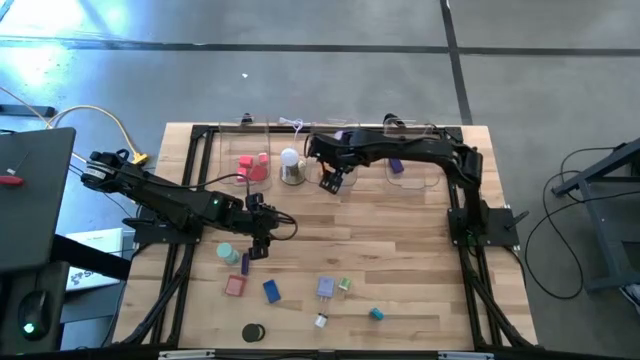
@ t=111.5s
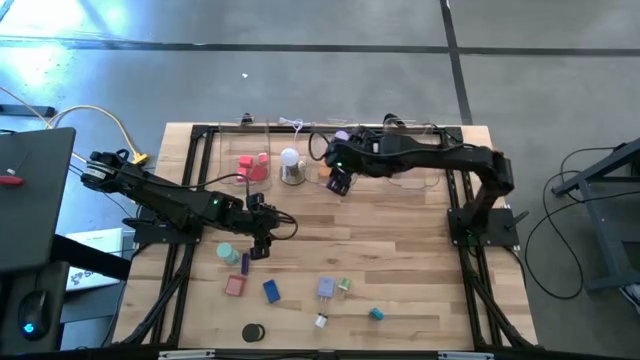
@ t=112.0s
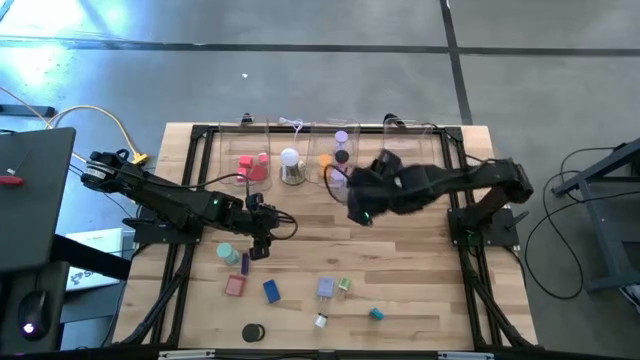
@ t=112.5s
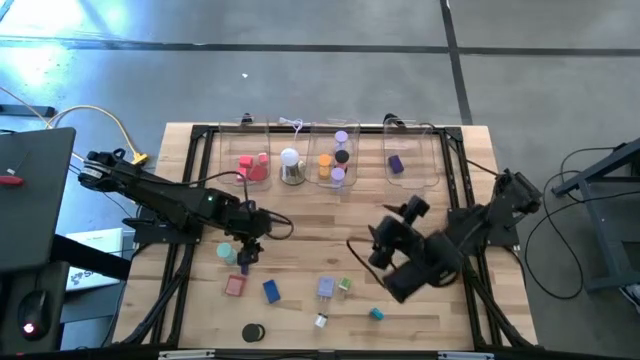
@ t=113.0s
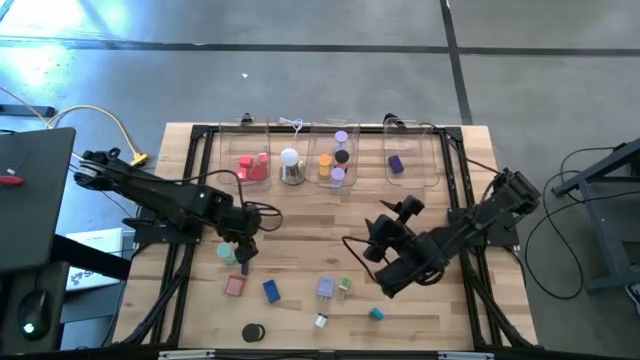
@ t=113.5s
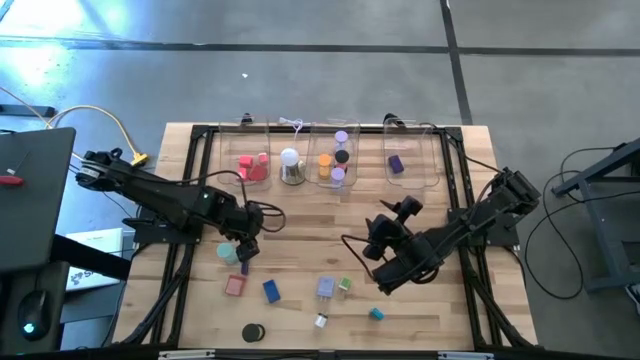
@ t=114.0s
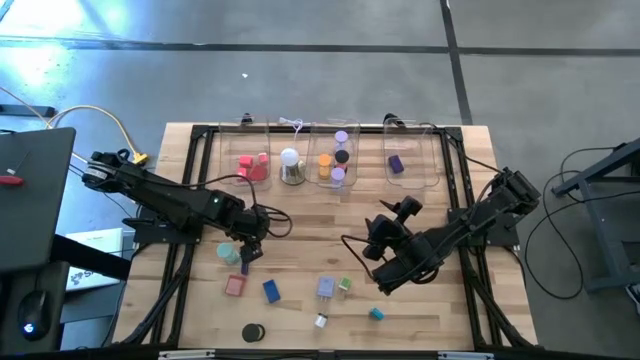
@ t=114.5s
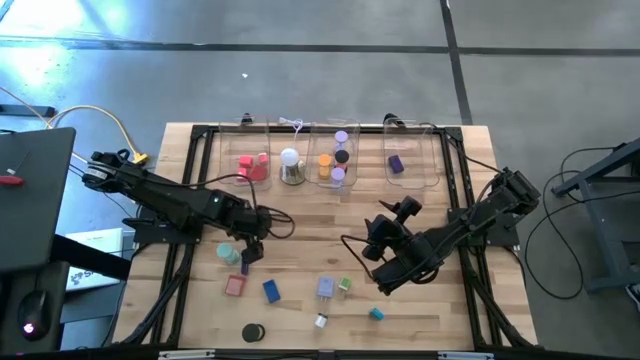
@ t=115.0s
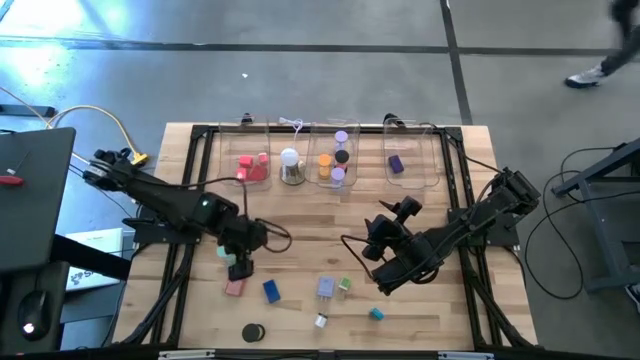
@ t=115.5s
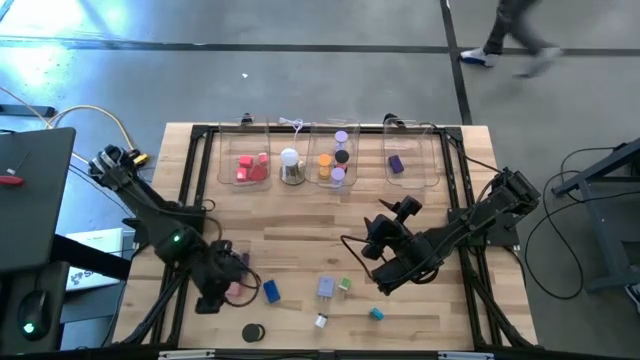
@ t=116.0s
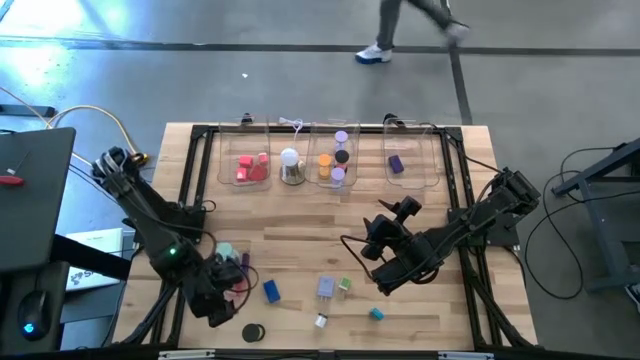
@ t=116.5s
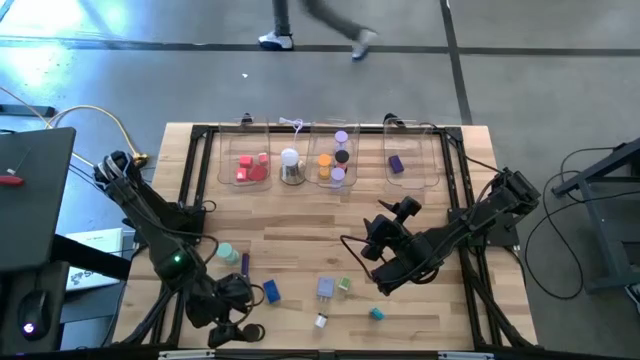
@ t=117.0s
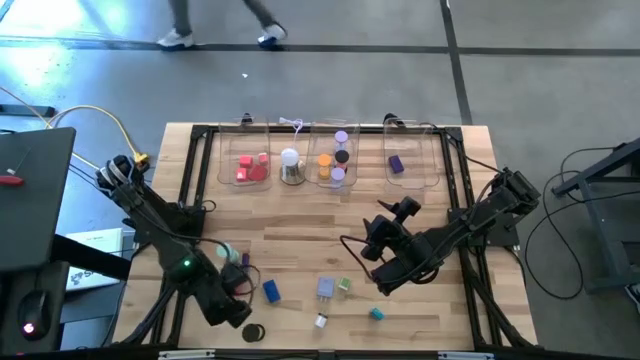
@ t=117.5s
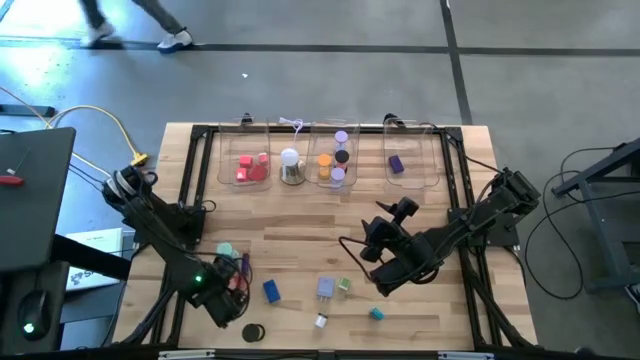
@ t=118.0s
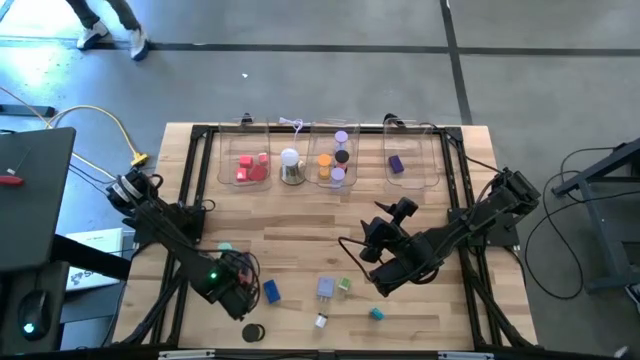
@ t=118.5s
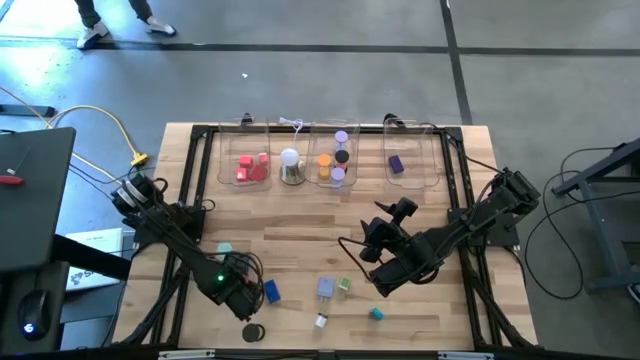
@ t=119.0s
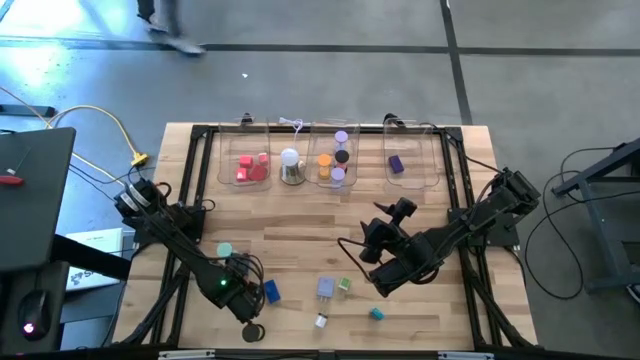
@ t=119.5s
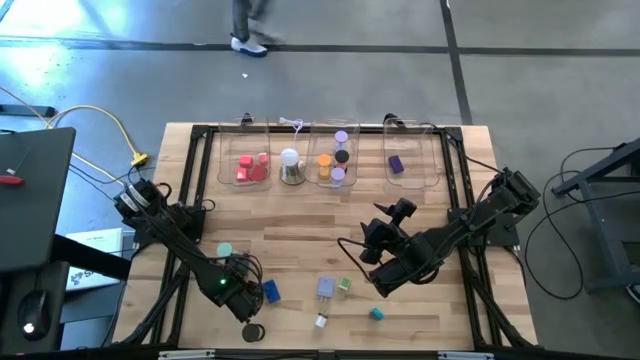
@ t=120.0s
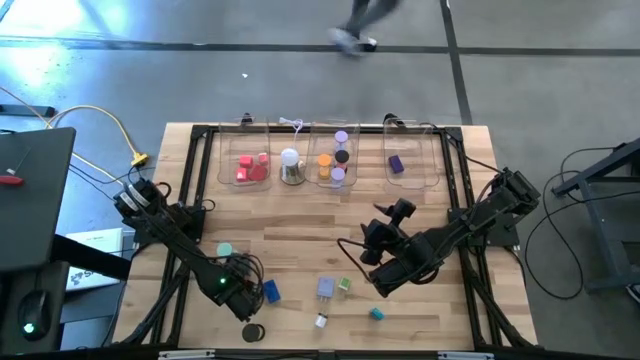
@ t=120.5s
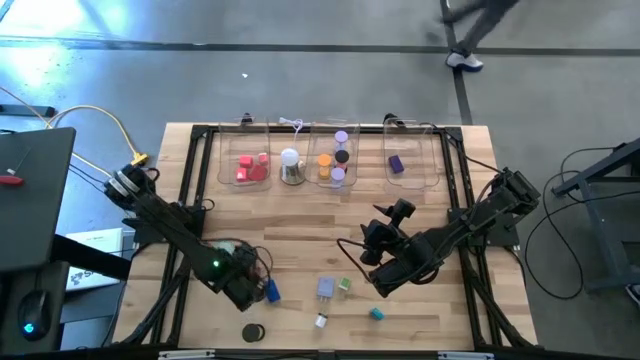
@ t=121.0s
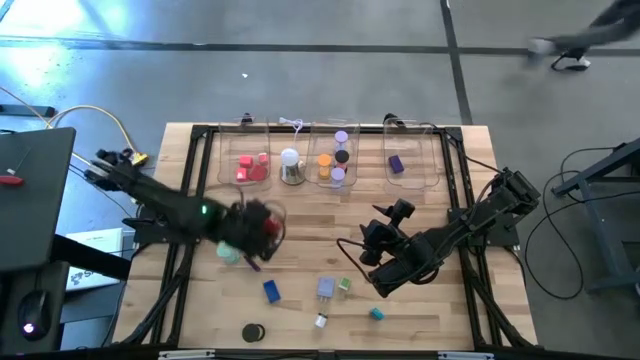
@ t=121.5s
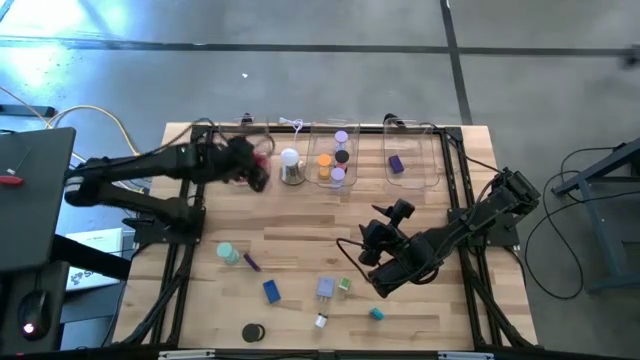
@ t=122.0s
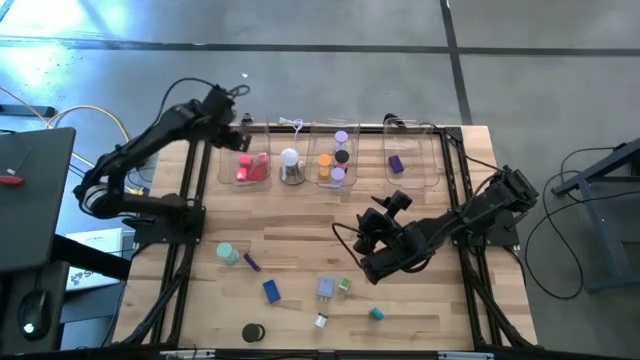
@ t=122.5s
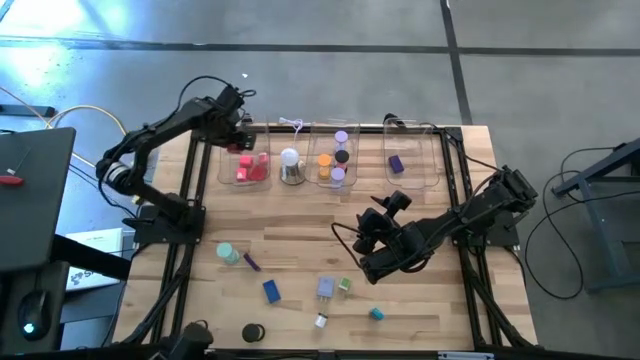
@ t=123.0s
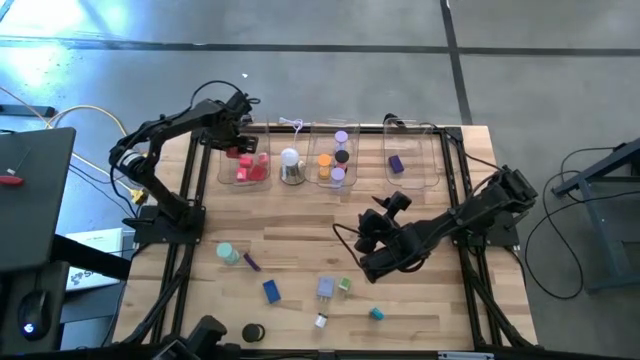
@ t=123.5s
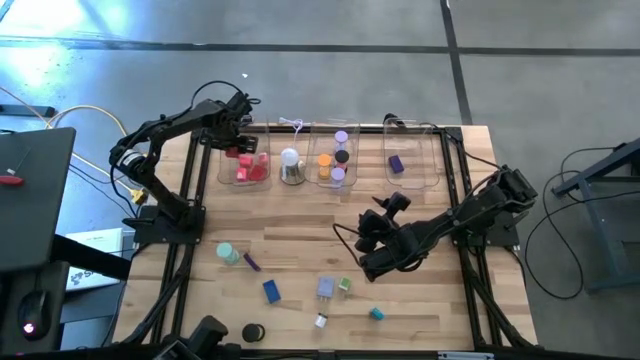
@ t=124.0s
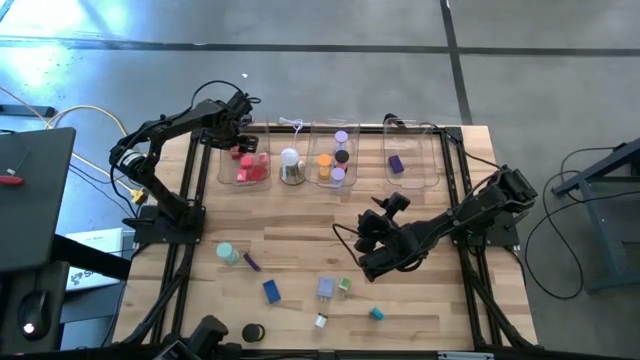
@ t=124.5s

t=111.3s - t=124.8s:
Task: Pick & Place Office items
Put the red charger adapter into the left transparent bin

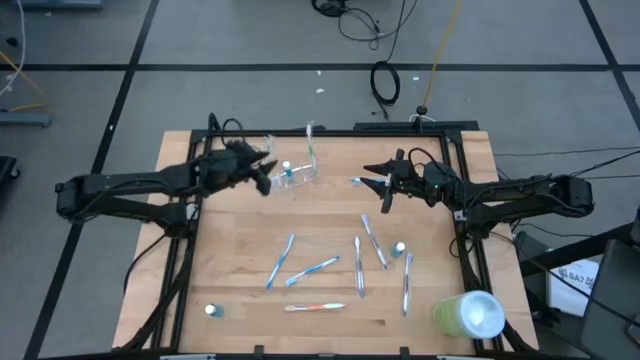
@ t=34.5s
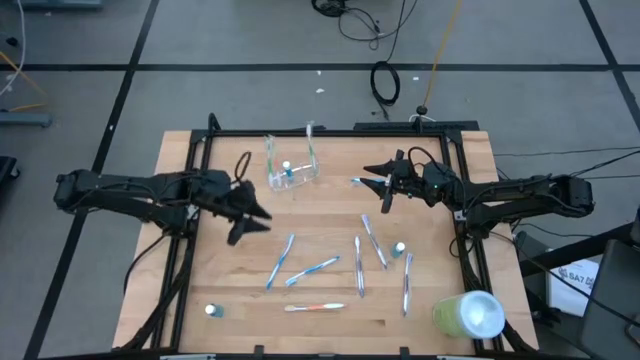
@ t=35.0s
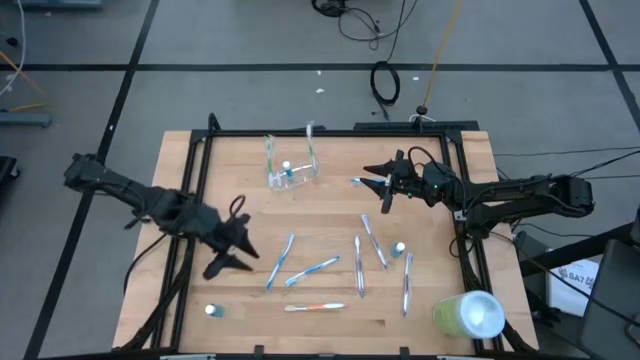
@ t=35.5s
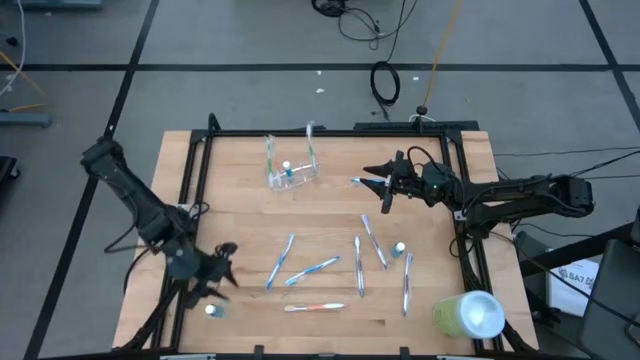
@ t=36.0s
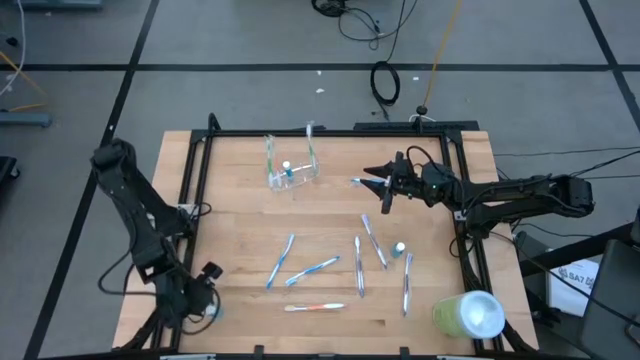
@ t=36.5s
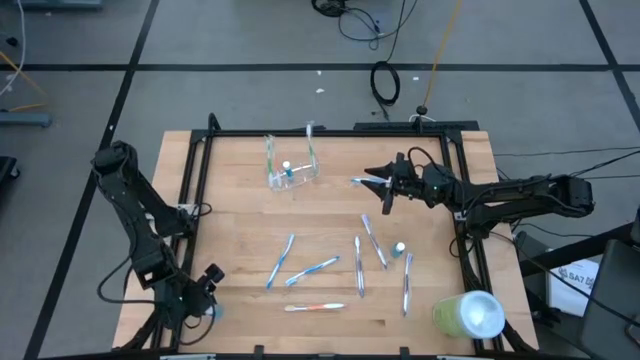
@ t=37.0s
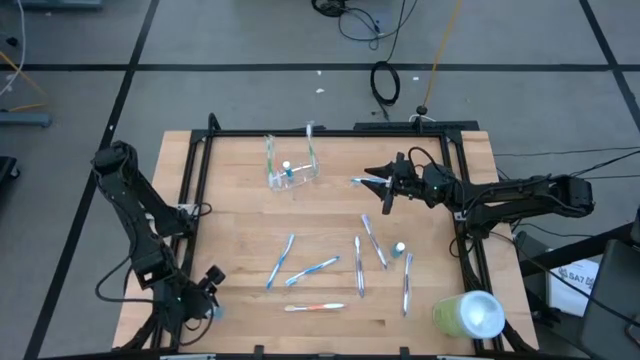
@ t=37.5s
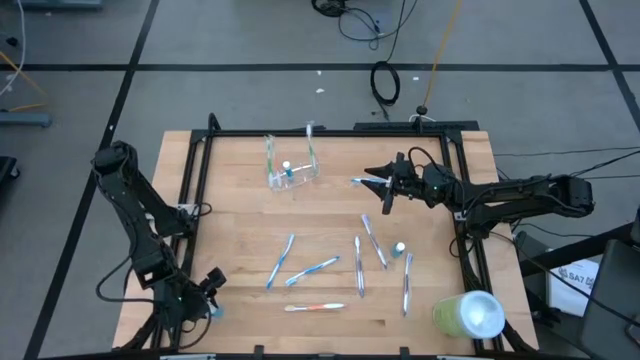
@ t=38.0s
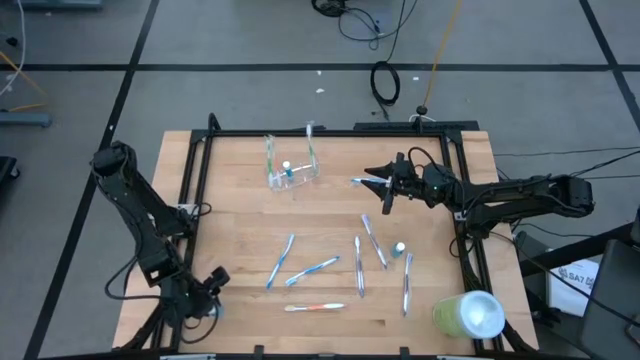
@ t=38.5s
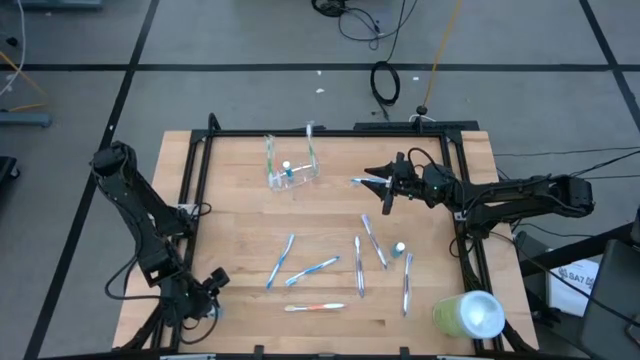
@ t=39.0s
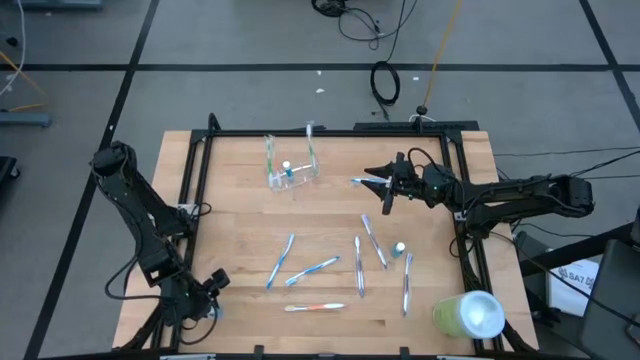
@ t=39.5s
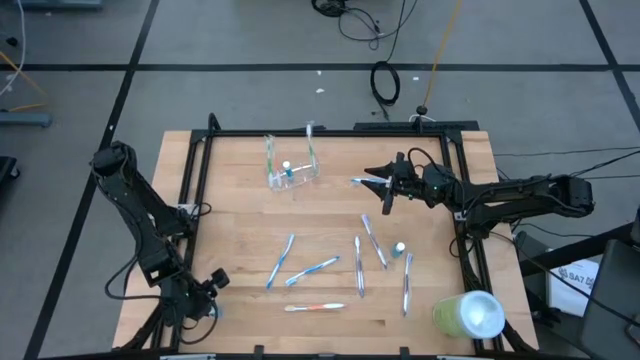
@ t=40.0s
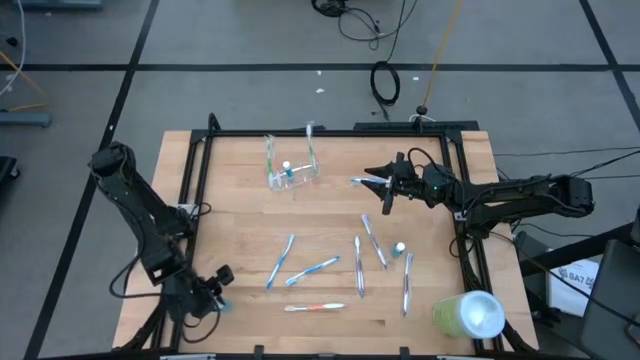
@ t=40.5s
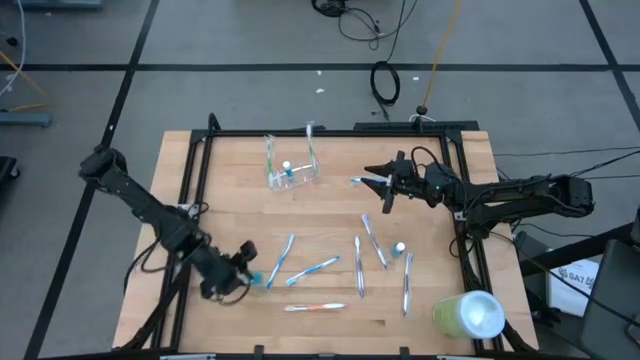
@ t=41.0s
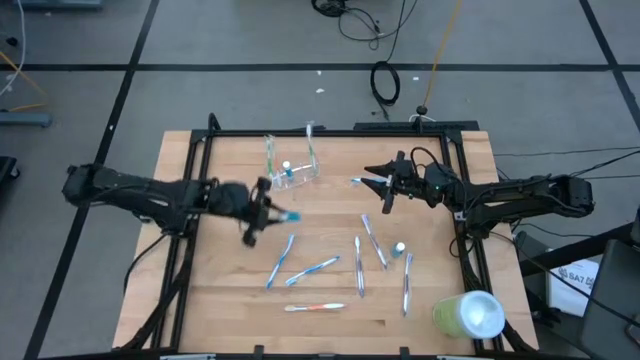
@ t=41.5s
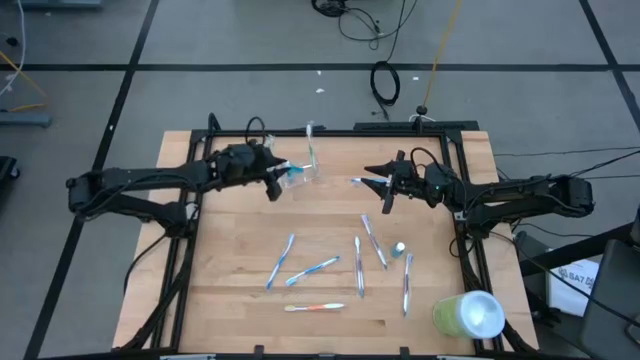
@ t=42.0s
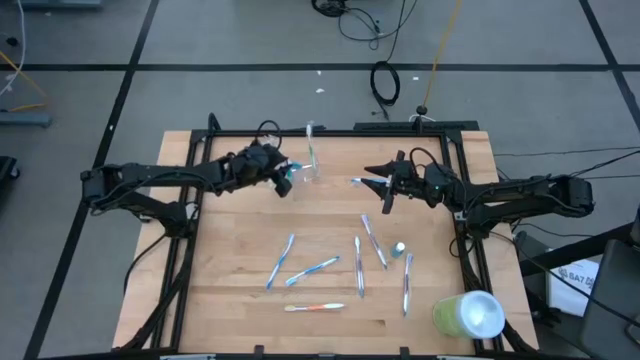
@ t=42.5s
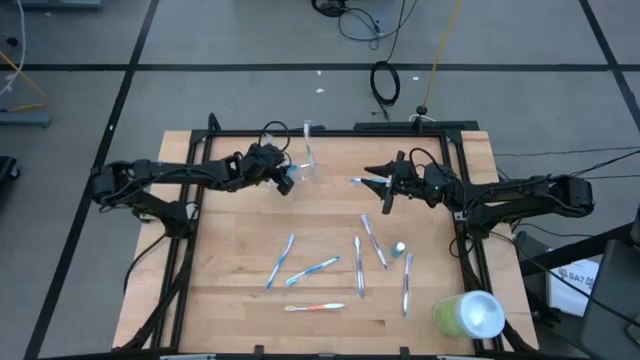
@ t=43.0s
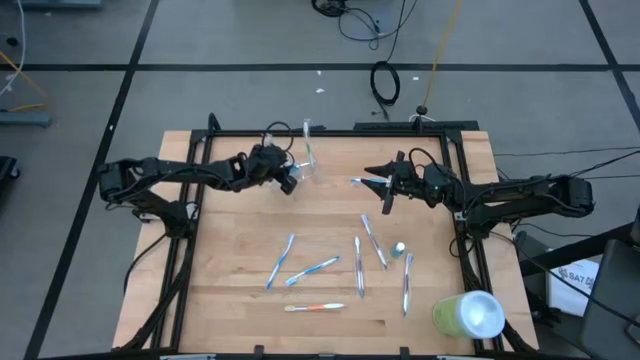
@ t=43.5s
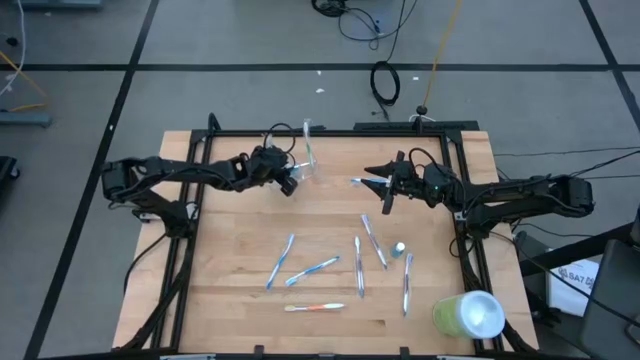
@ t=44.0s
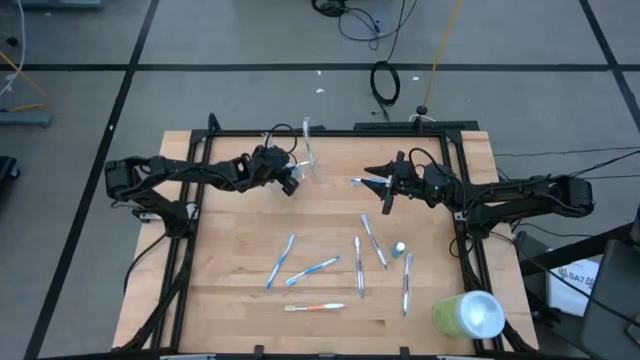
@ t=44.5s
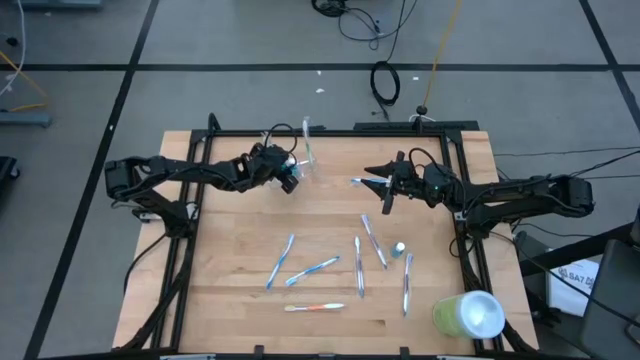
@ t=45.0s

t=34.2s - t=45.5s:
Task: Pick & Place toothbrushing station
Put the left mouthwash into the transparent organizer
